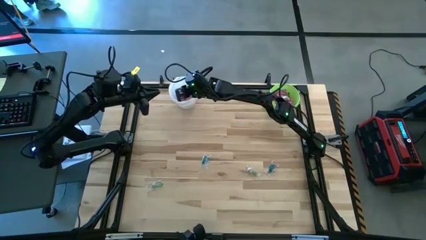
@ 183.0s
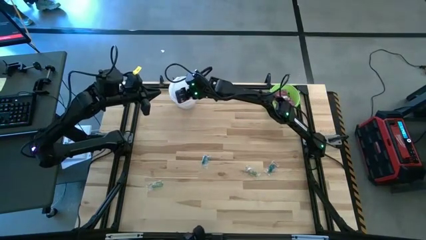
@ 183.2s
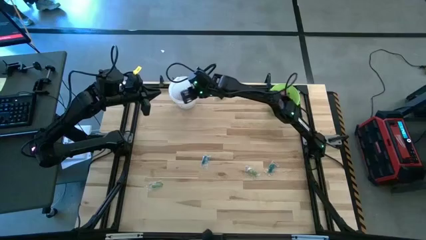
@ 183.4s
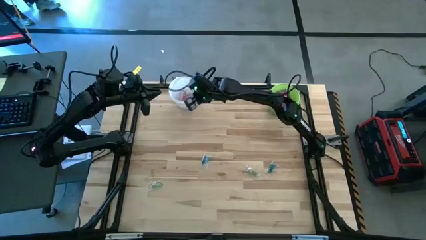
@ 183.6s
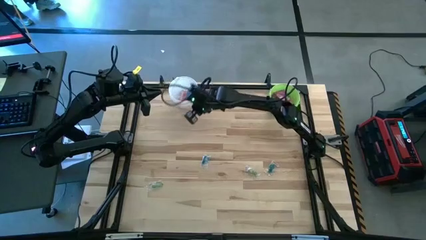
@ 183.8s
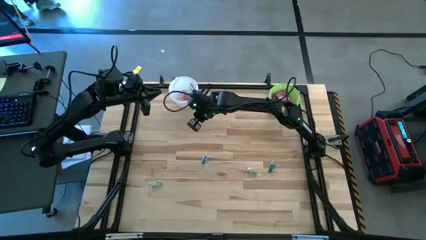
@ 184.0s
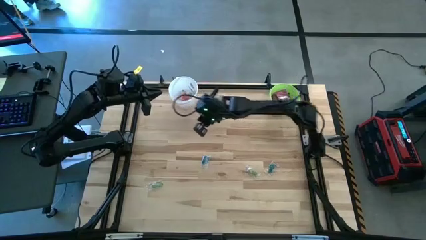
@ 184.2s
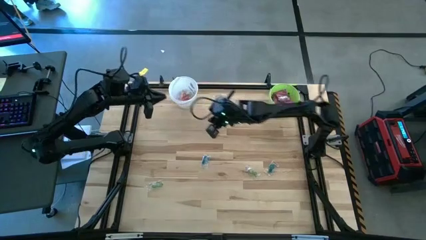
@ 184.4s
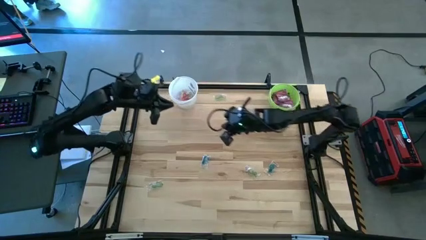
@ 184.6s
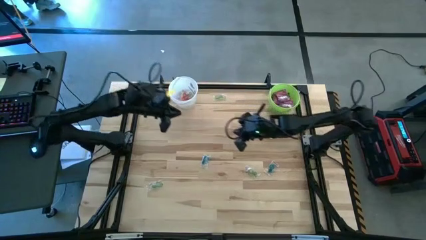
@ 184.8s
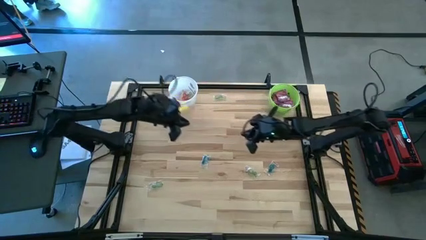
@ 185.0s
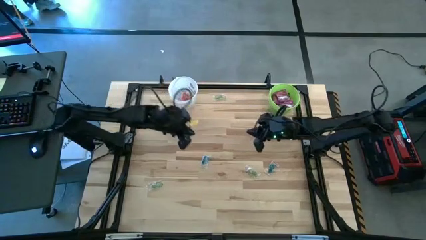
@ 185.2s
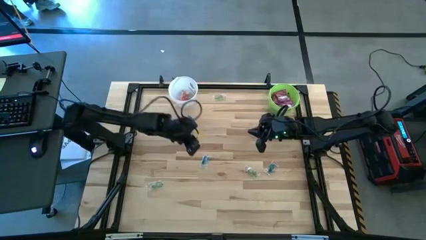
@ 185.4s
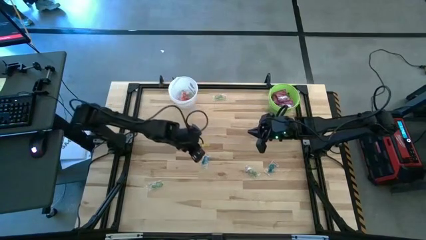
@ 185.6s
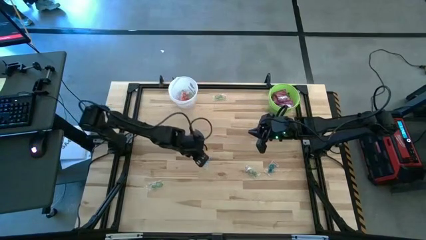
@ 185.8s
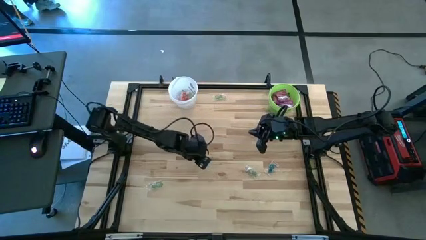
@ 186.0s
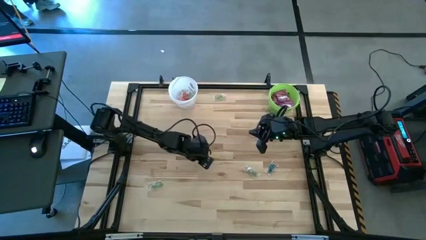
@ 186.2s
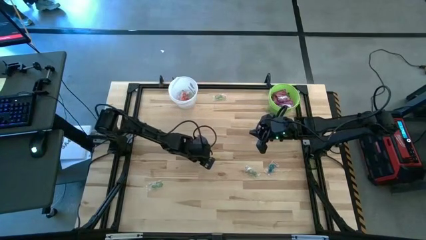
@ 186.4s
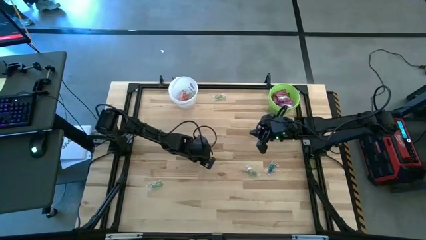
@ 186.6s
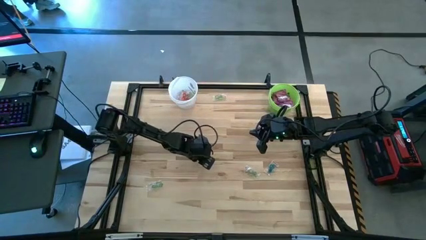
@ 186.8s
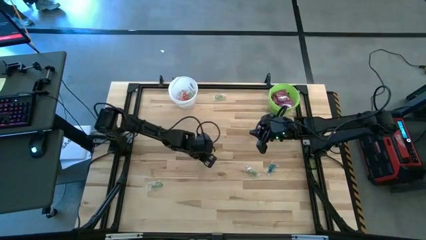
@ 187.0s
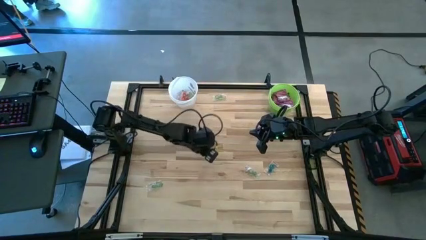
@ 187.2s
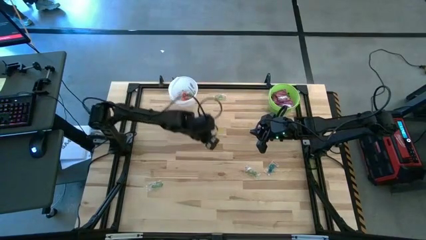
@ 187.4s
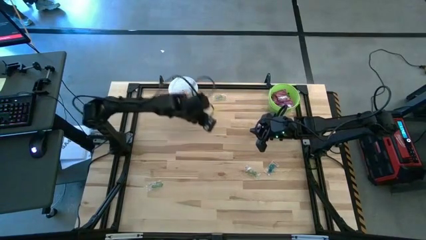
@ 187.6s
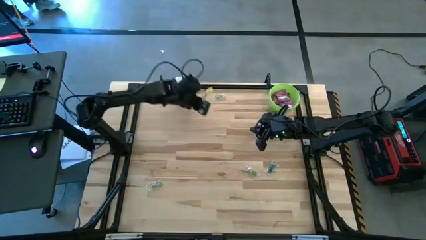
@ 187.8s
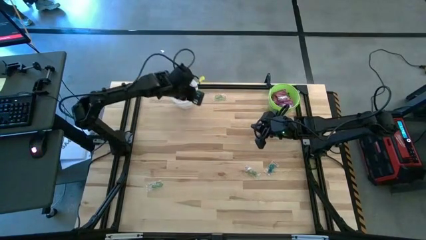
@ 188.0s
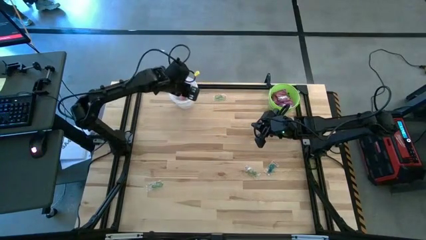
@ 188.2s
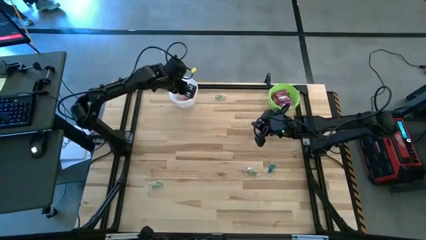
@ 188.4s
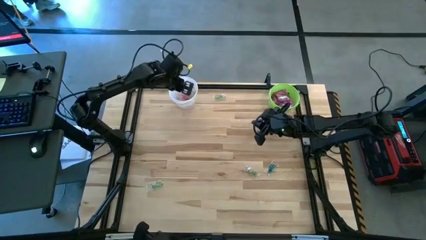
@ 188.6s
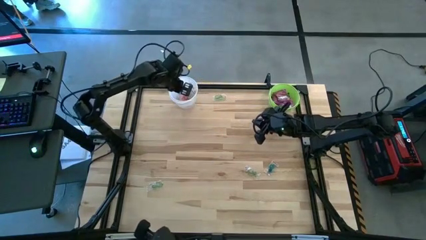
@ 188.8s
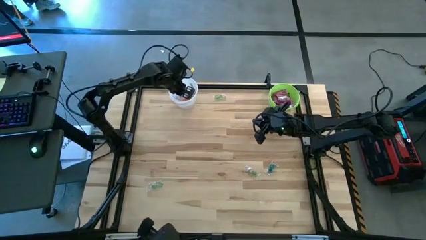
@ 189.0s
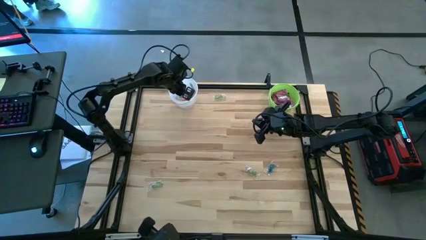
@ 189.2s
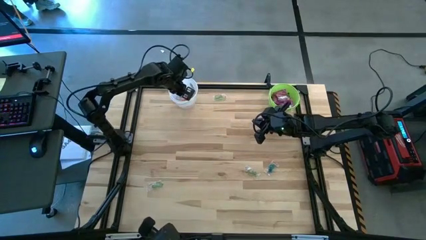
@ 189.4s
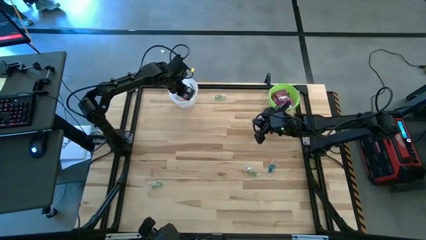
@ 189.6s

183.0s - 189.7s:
Task: Sort candy by brand, put in halloween buckets
Put the blue gummy into the white bucket

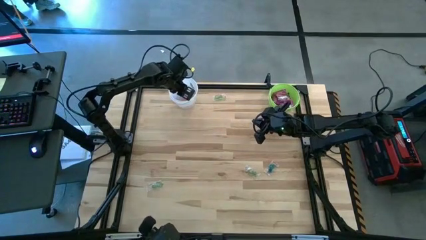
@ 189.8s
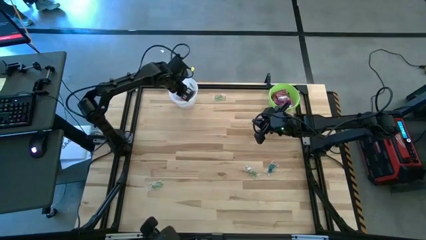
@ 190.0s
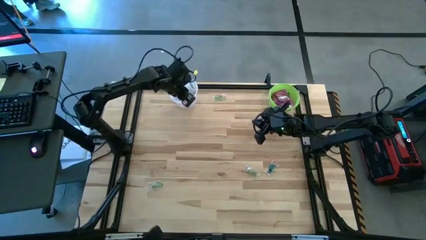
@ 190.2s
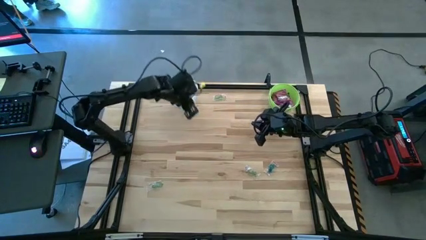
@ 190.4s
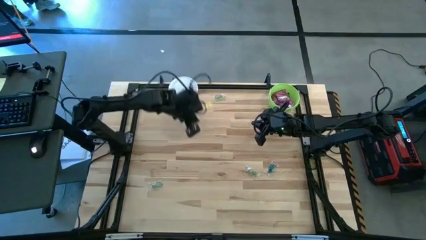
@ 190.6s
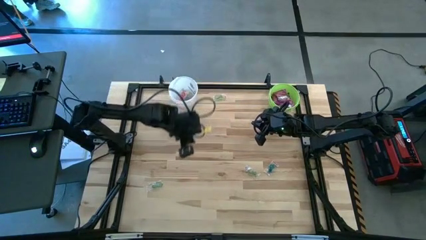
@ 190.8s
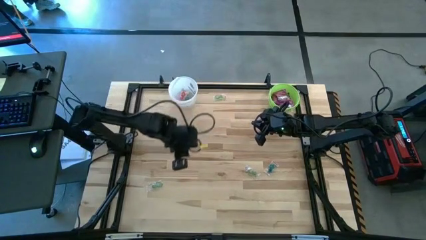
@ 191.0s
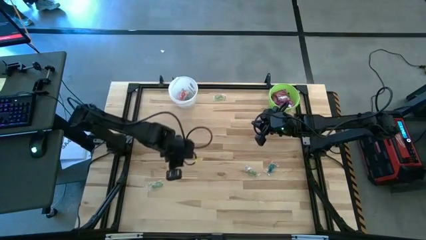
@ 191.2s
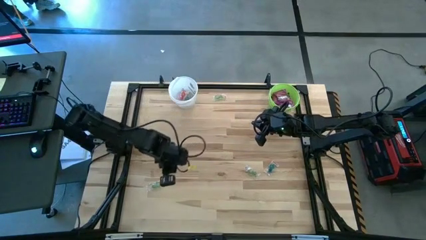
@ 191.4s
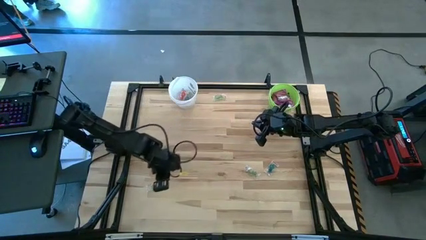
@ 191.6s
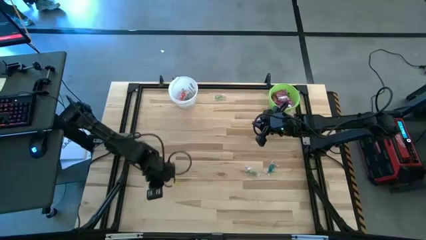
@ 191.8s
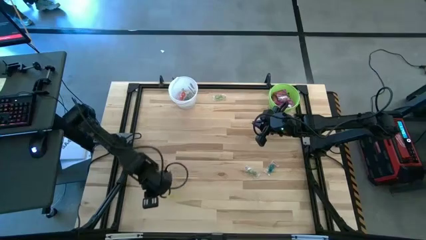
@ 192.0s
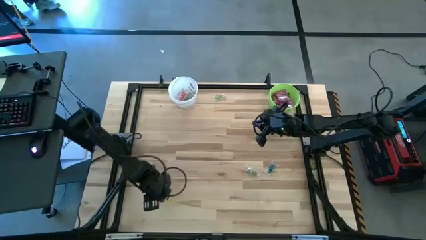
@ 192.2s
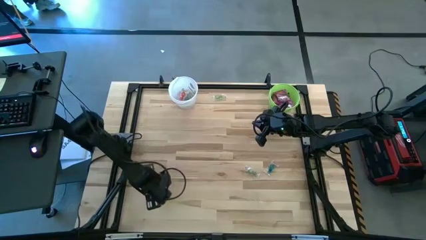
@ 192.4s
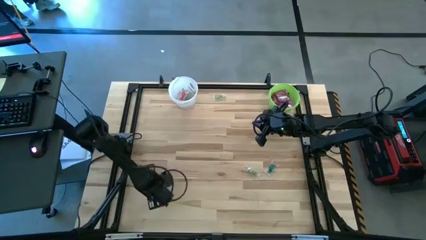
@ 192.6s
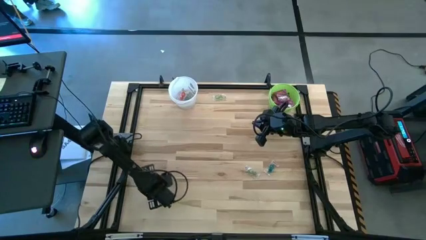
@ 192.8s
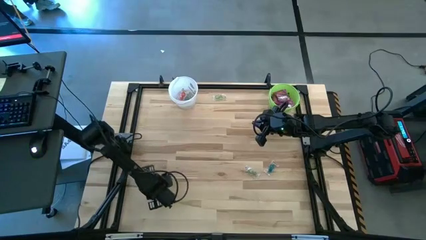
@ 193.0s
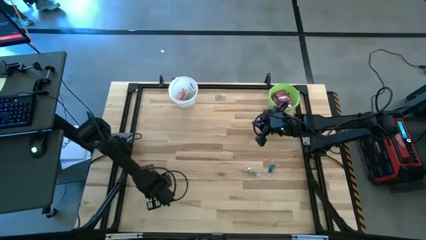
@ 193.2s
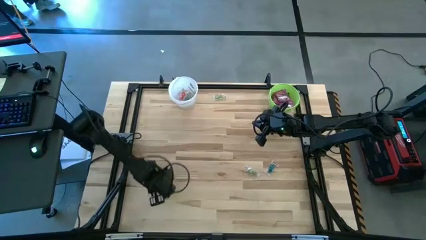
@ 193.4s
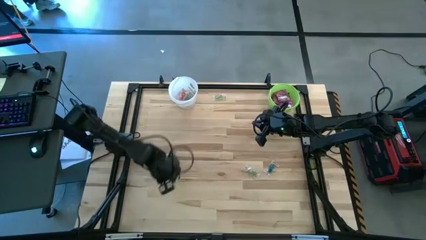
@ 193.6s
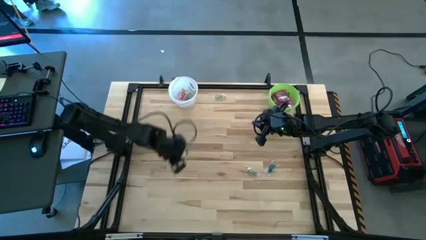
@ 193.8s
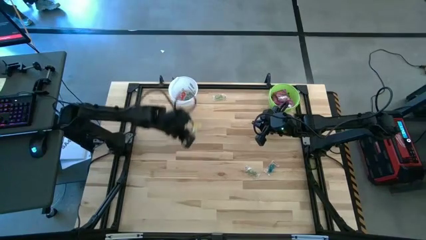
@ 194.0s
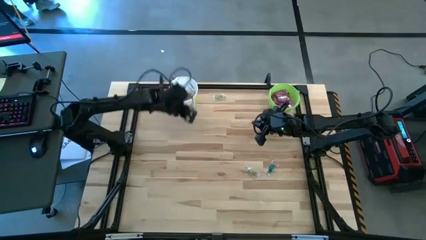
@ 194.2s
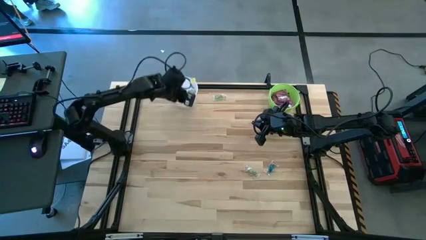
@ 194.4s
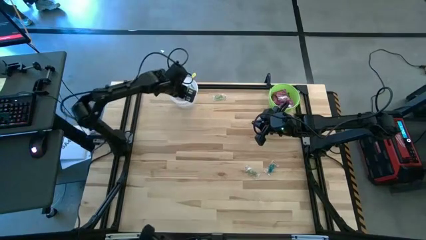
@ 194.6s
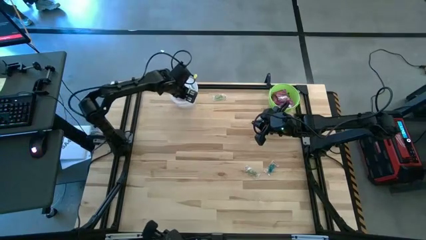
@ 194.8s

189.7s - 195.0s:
Put the green gummy into the white bucket

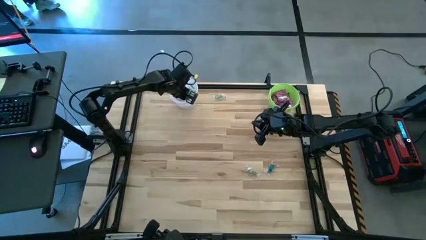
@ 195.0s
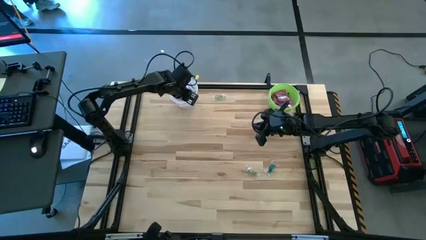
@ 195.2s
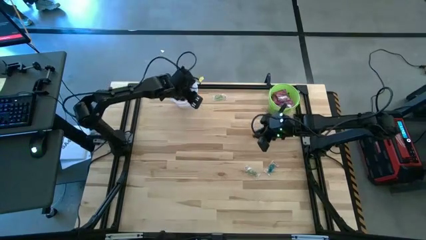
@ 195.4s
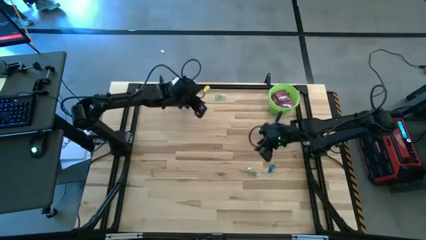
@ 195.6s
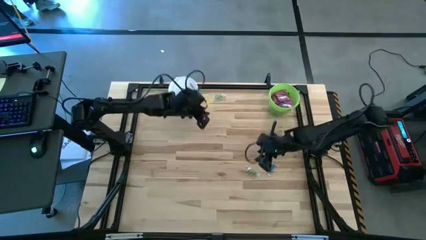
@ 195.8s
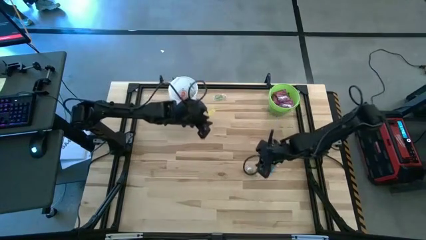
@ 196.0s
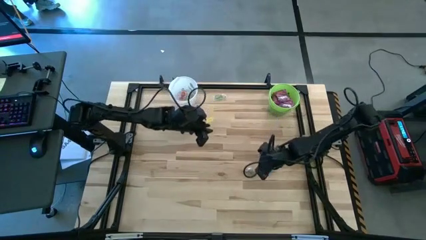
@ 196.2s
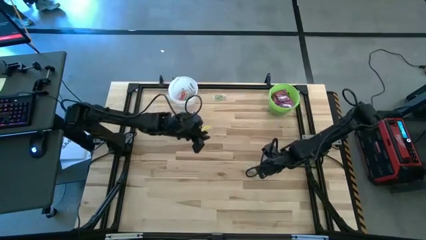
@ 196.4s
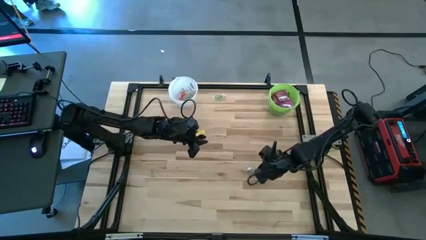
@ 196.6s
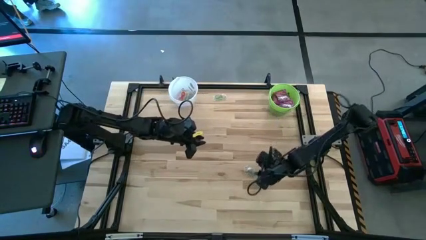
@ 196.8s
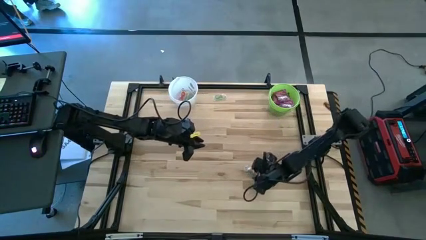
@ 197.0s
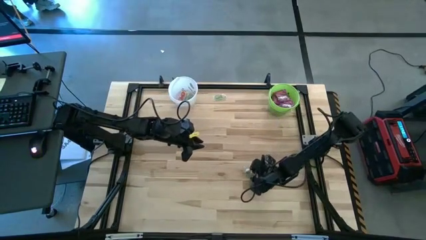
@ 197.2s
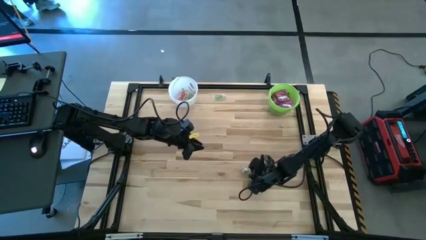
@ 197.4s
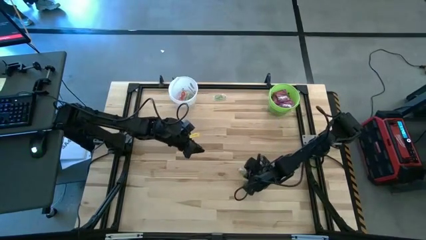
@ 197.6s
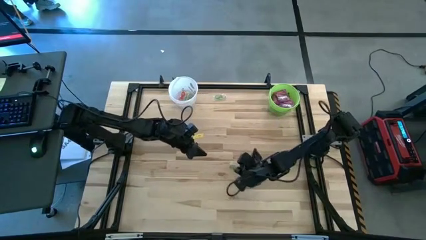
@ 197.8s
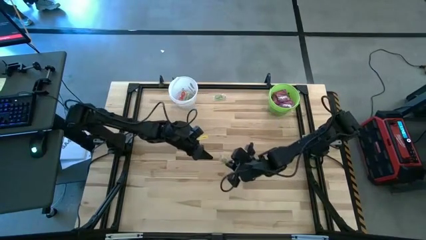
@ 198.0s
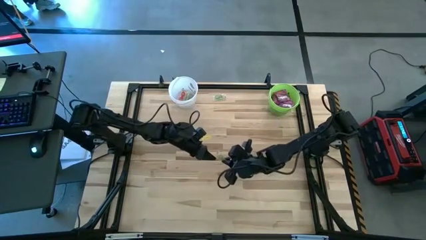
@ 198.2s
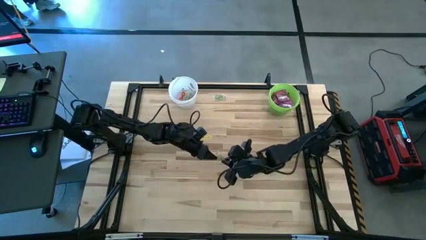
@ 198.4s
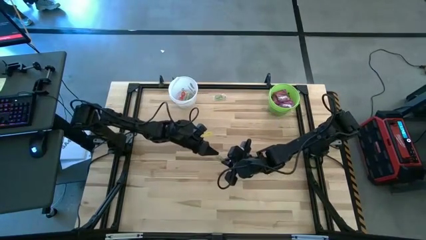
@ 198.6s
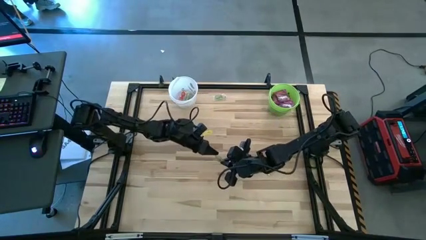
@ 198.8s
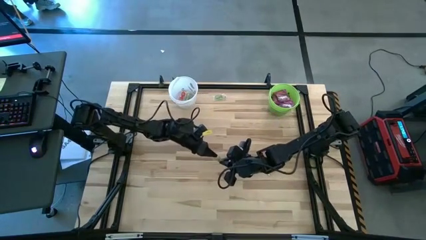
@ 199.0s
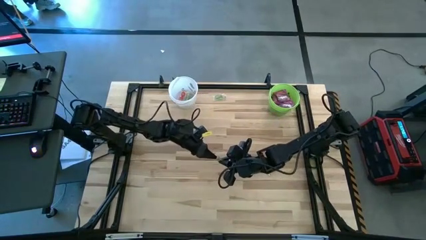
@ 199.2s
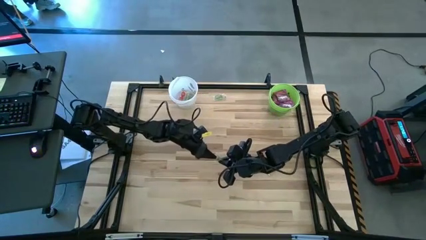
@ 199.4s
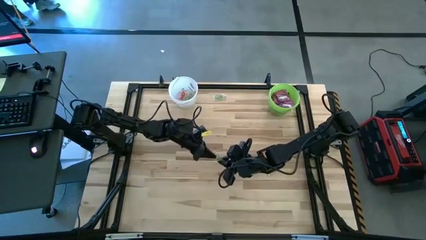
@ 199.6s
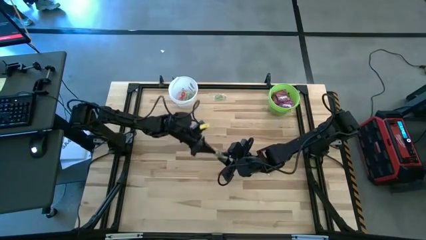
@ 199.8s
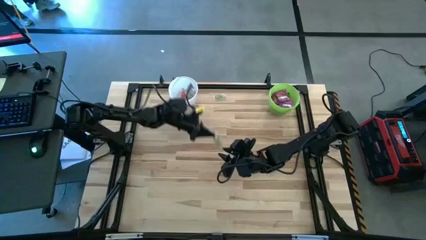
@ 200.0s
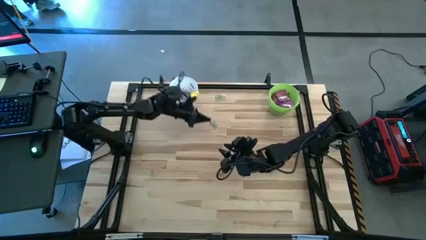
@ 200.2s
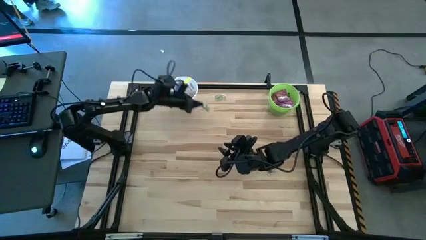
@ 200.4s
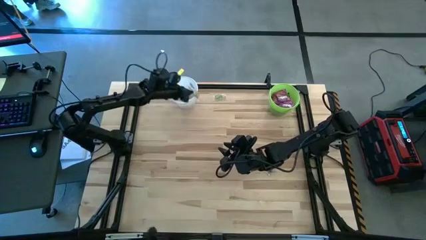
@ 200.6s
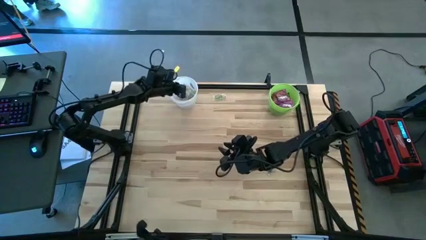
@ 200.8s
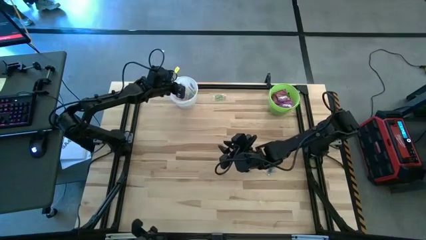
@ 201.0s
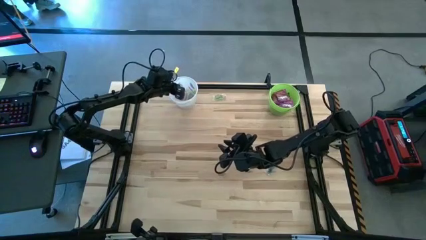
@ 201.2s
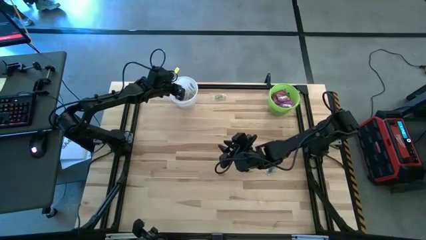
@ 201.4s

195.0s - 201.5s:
Put the green gummy into the white bucket
